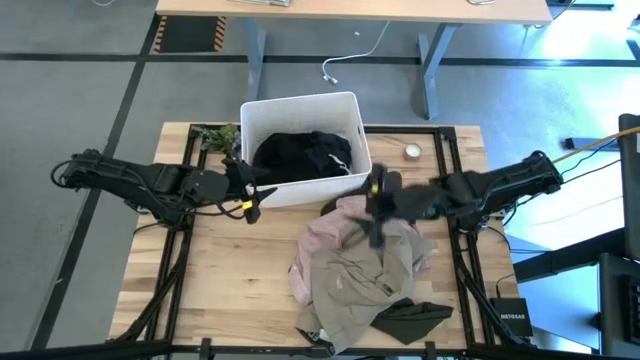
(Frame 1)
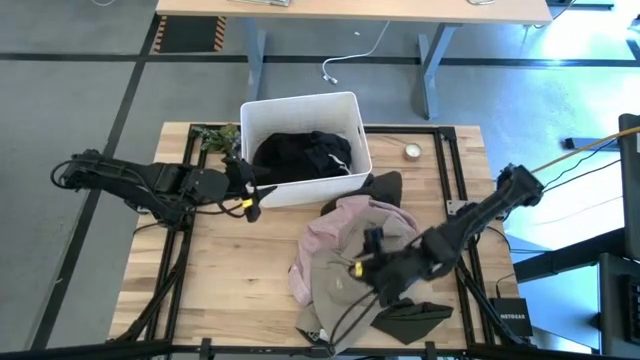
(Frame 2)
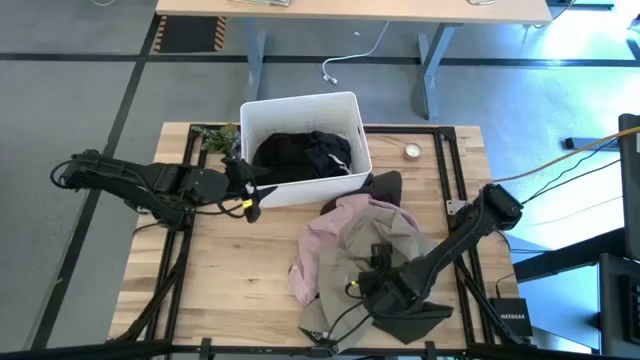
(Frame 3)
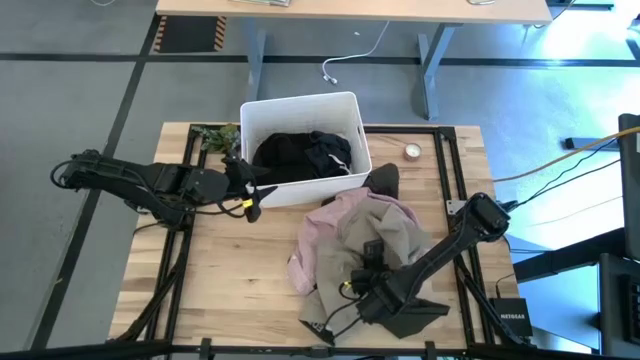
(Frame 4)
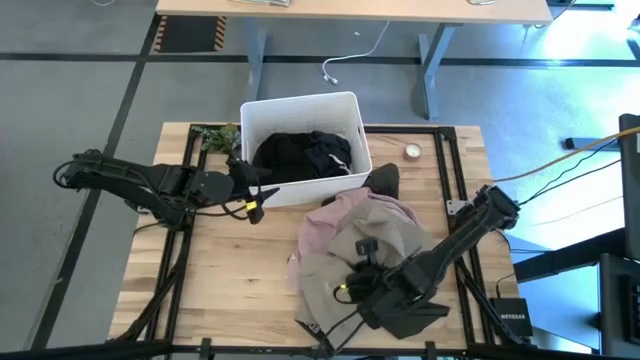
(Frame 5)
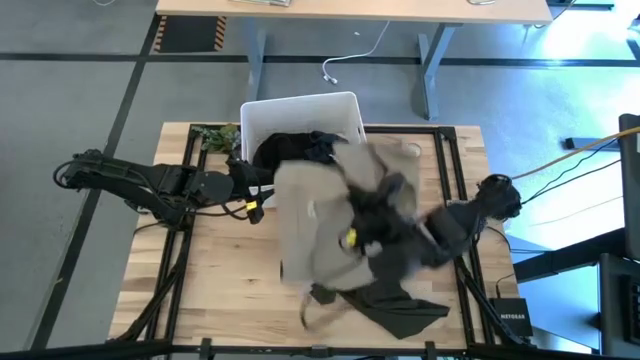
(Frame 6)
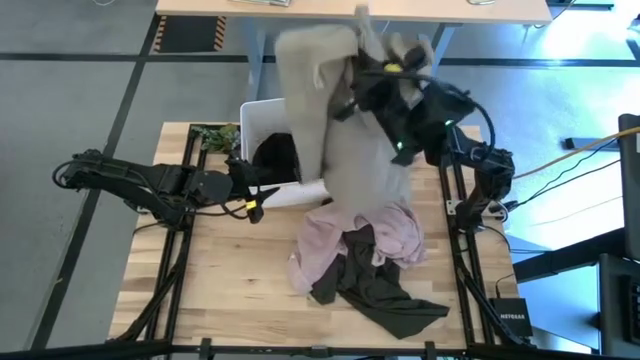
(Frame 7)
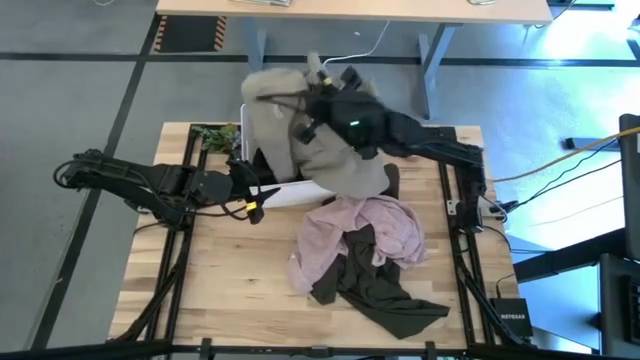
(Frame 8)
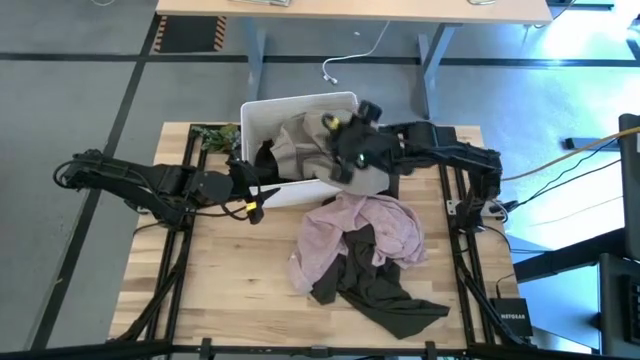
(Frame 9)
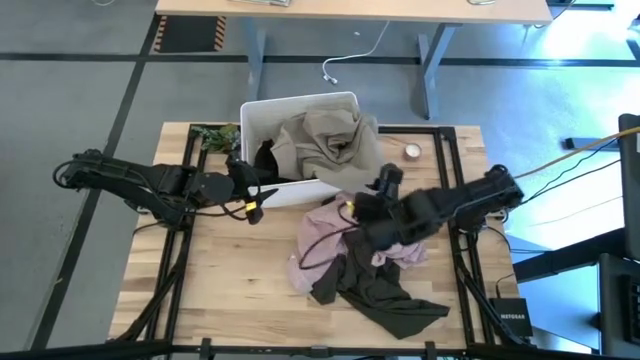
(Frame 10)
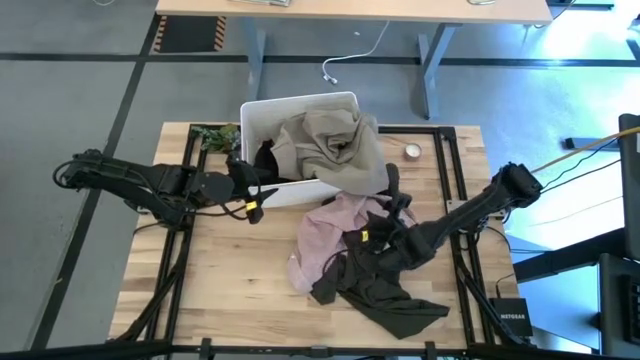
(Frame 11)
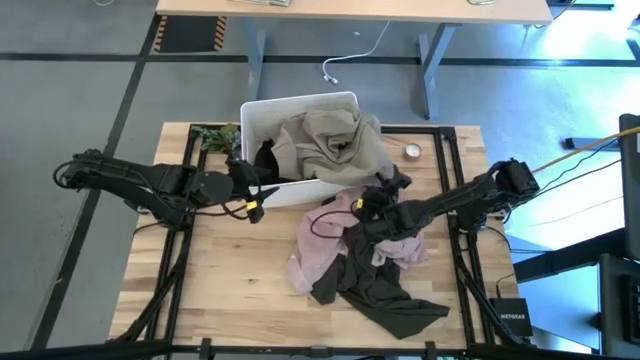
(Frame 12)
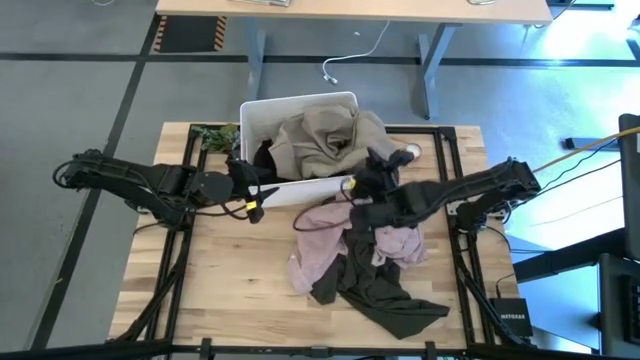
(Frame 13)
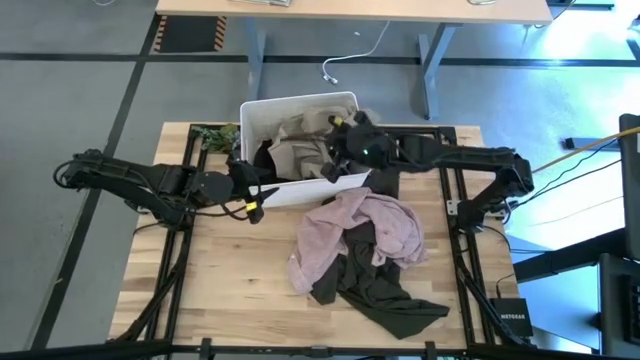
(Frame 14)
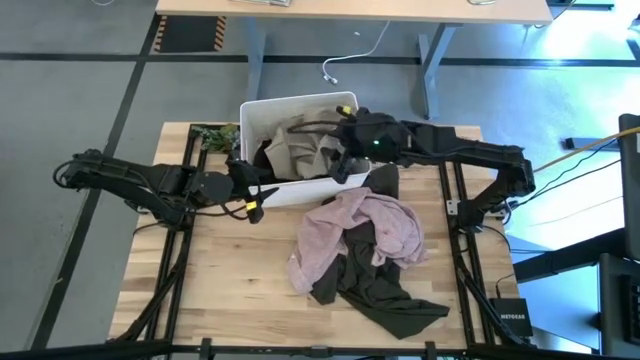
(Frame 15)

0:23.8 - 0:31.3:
Task: Sort clothes
Put the brown pants into the white laundry bin

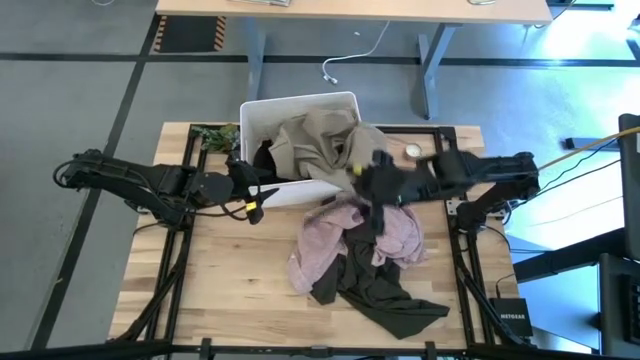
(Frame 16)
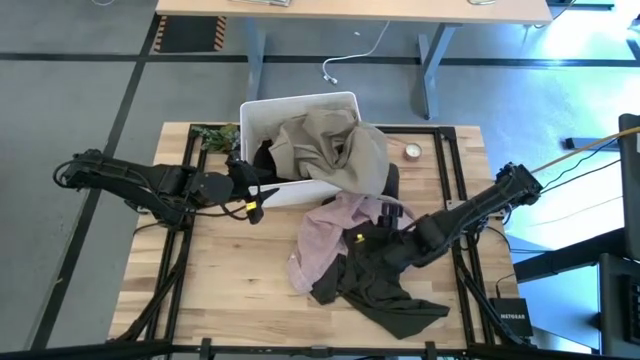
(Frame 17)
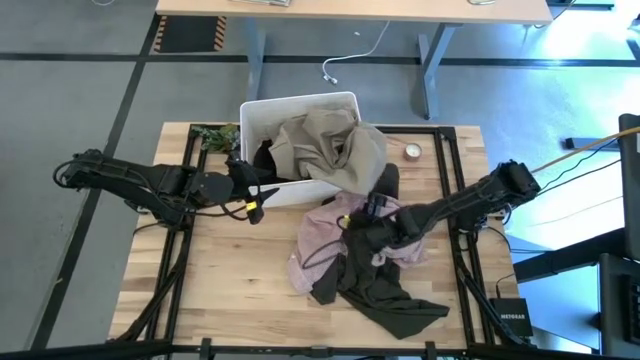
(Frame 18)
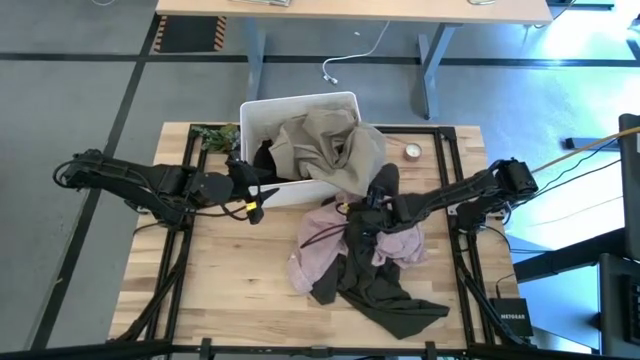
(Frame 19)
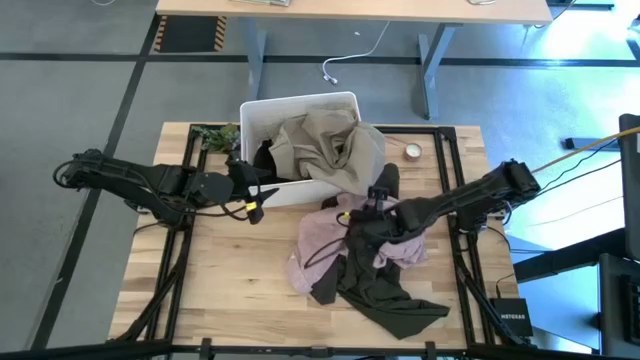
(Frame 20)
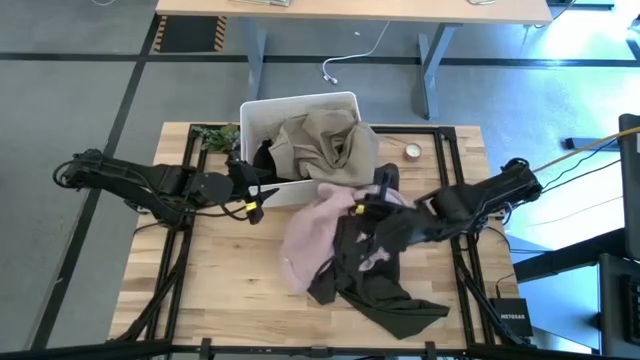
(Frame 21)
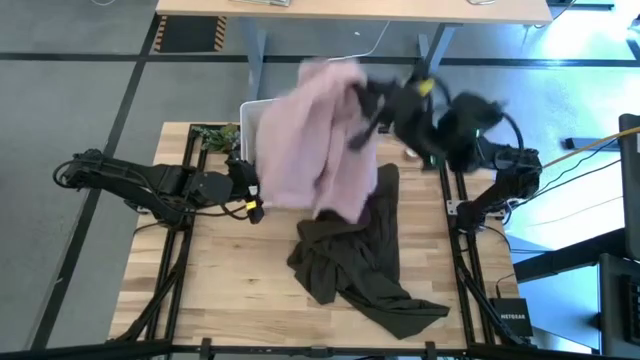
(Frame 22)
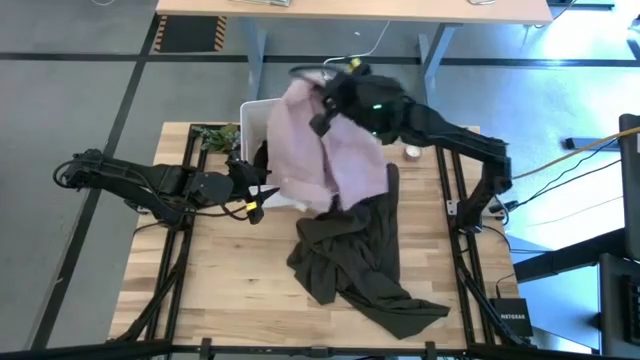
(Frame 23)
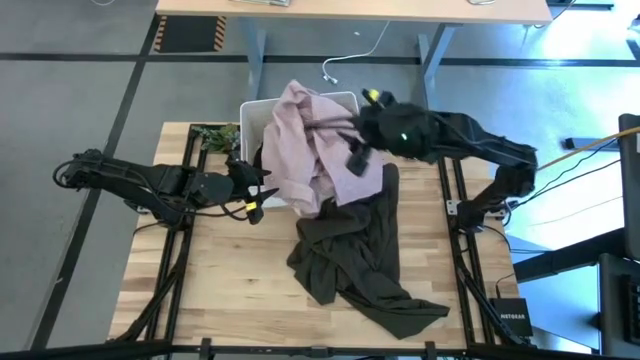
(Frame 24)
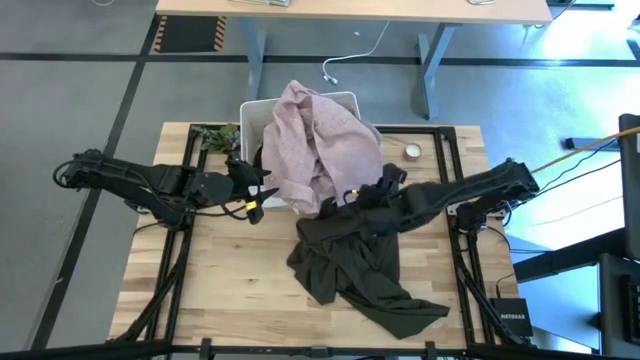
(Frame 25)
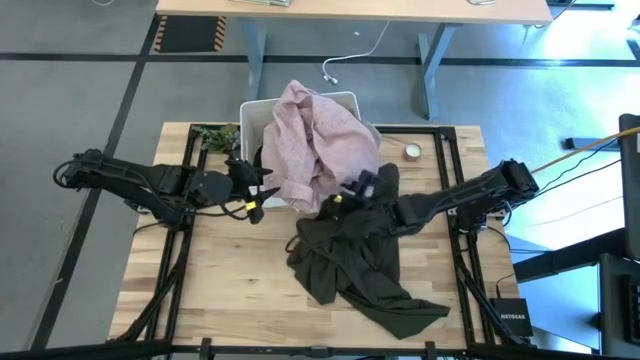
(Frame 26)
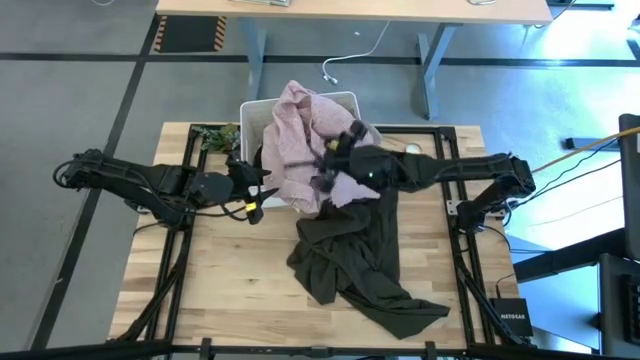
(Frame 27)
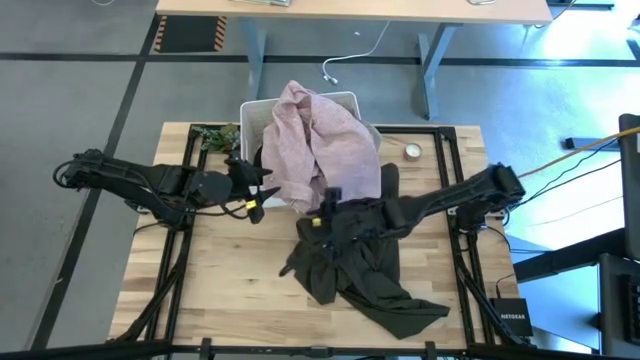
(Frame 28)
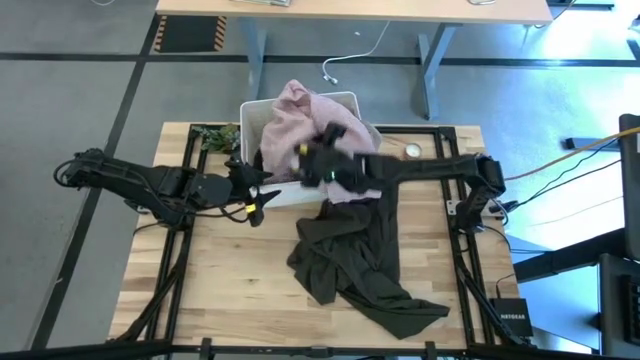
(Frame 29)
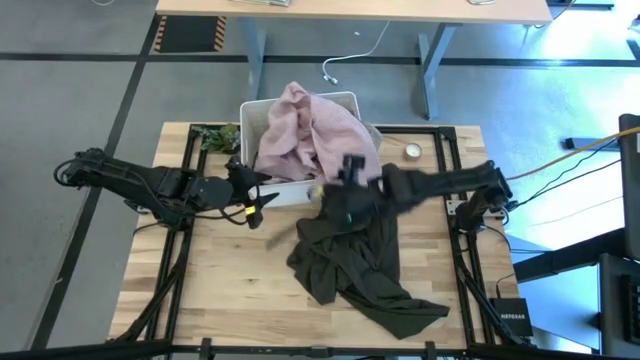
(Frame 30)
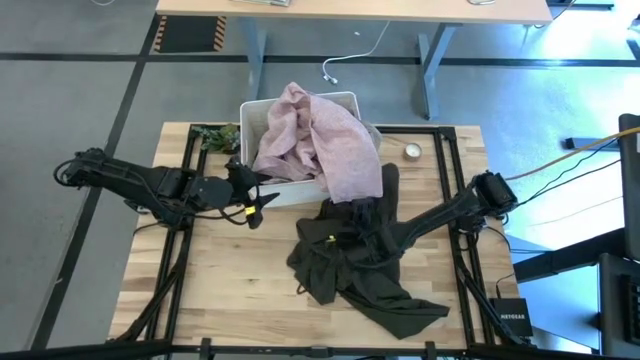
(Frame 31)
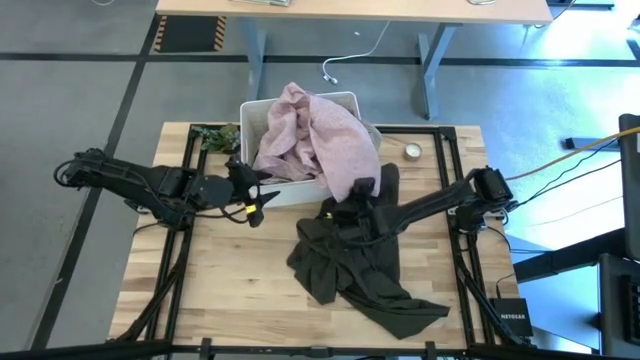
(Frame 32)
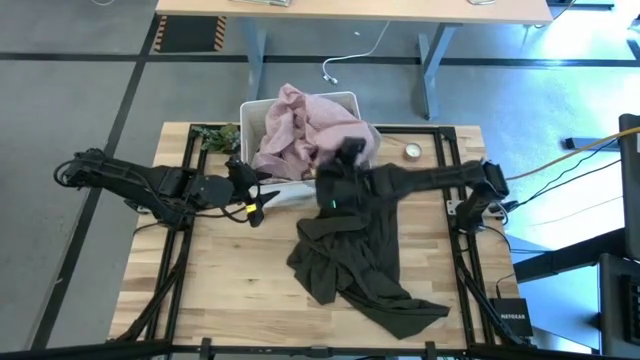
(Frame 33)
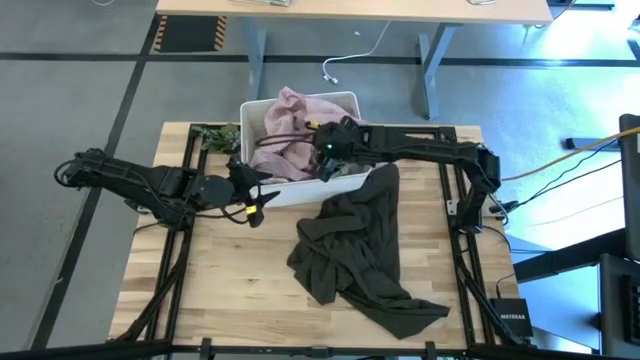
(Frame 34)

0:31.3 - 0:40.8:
Put the pink shirt into the white laundry bin

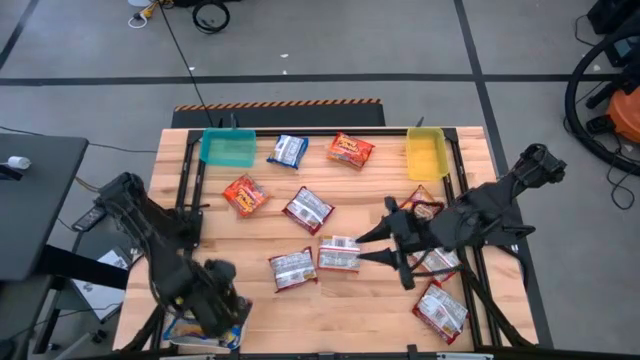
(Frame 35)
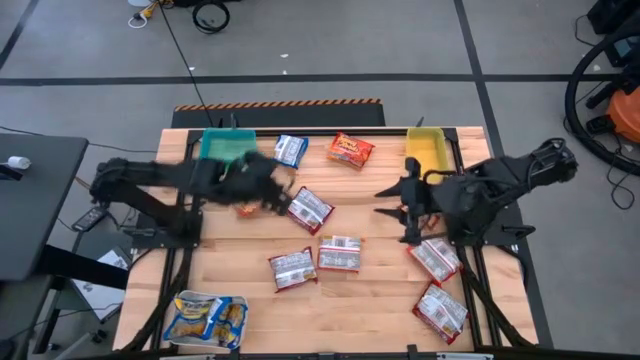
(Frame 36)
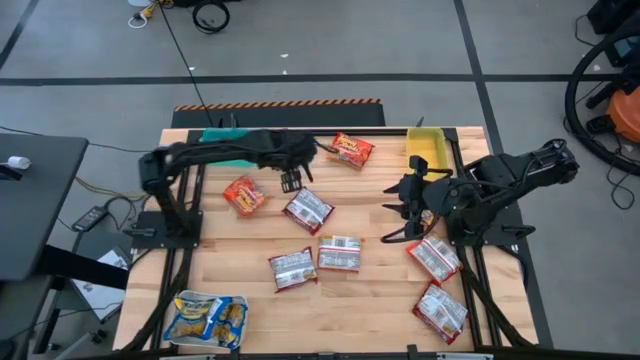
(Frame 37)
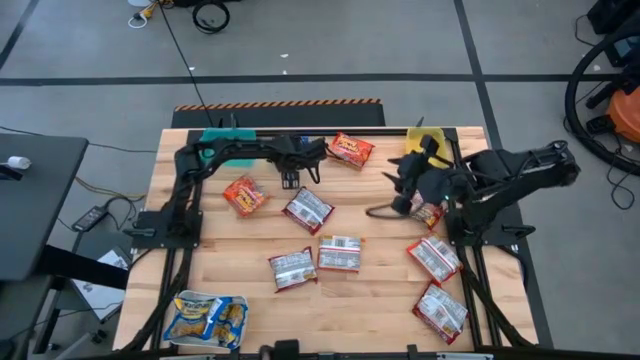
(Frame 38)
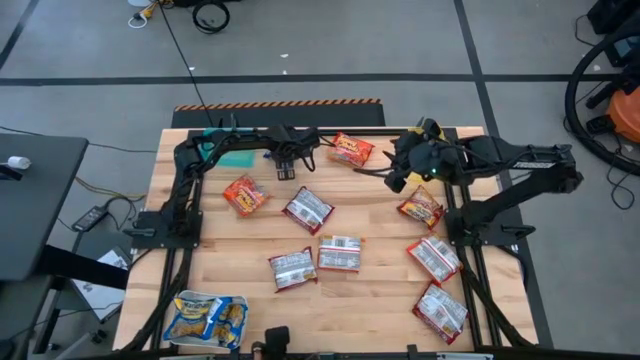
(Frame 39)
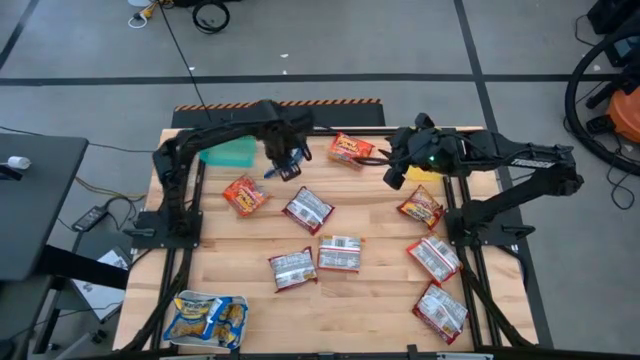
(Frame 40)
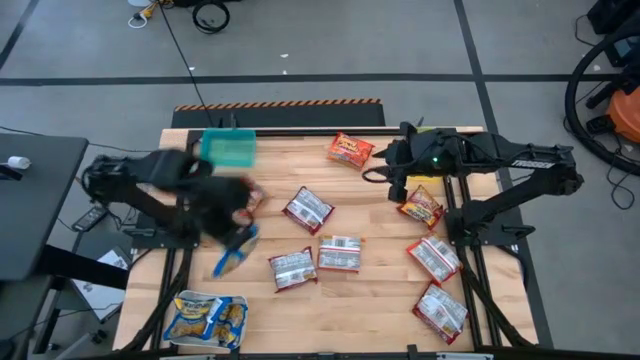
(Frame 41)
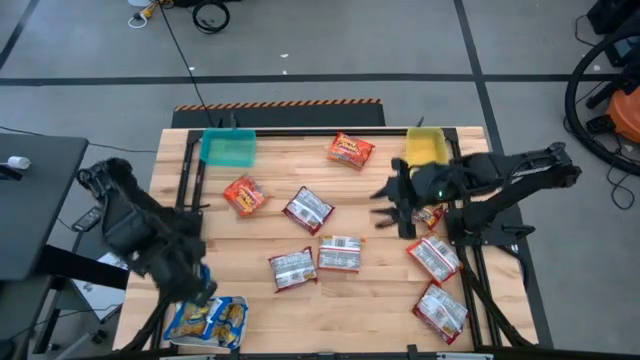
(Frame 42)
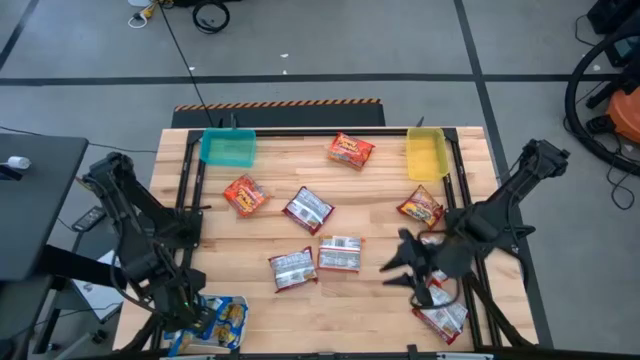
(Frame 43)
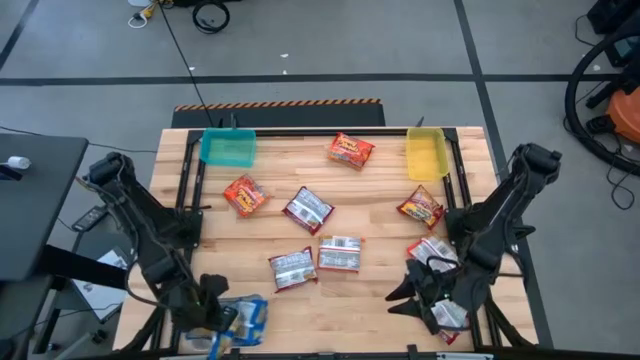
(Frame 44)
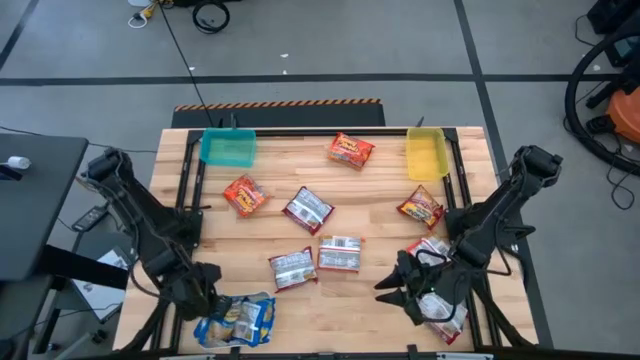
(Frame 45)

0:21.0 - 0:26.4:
Task: Sort Maruchan noodles
Put the blue noodle pack into the white bin
